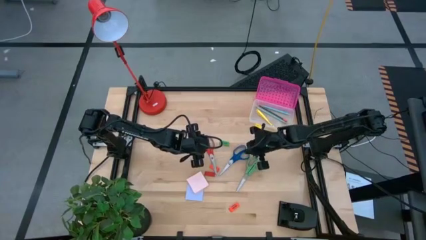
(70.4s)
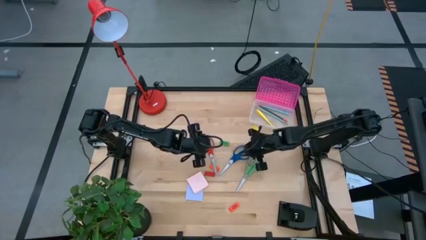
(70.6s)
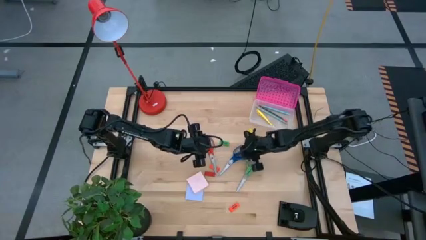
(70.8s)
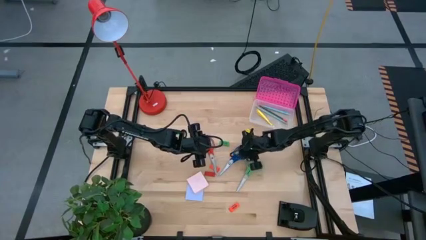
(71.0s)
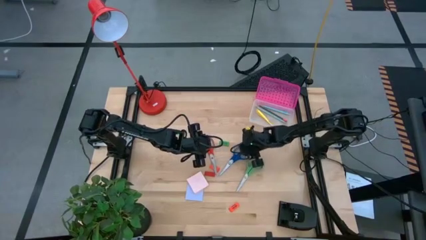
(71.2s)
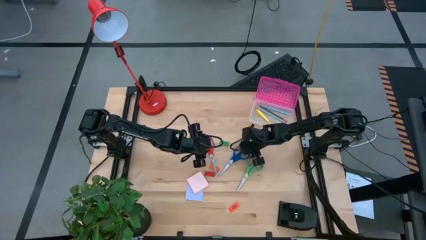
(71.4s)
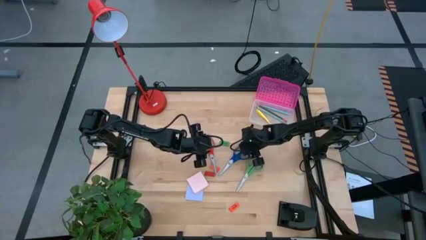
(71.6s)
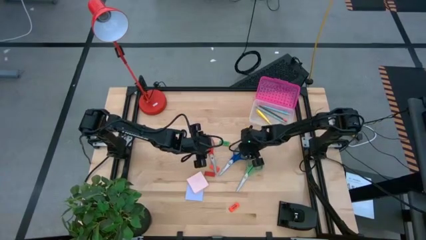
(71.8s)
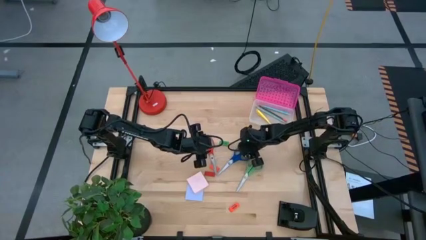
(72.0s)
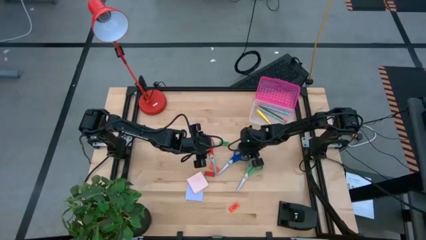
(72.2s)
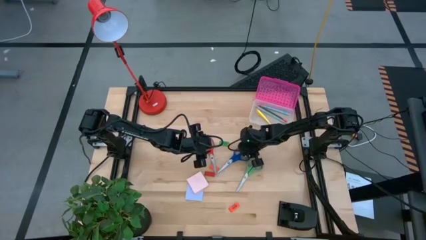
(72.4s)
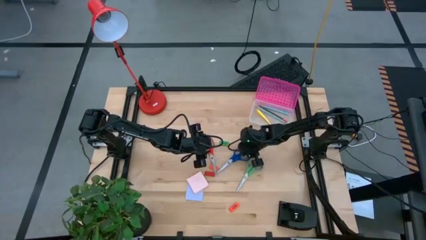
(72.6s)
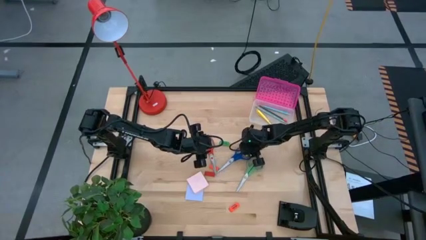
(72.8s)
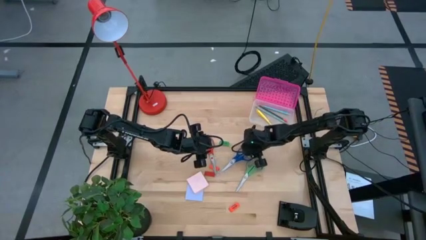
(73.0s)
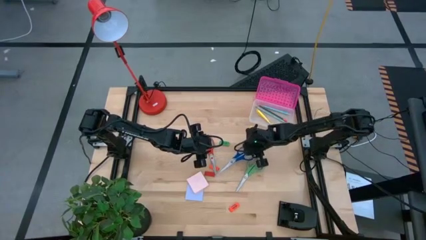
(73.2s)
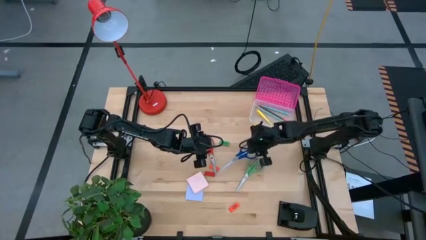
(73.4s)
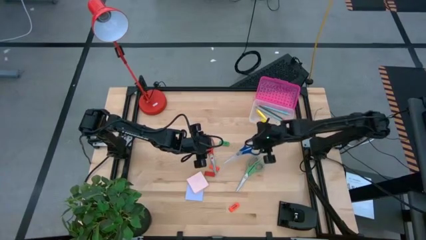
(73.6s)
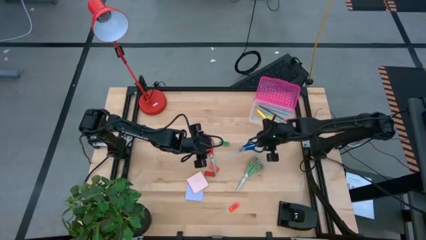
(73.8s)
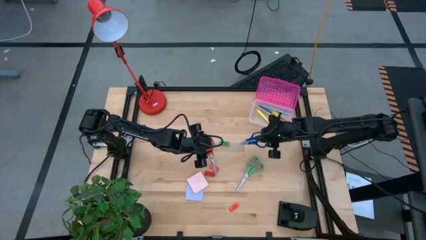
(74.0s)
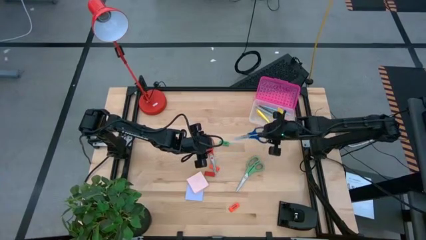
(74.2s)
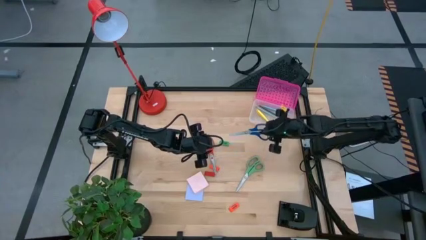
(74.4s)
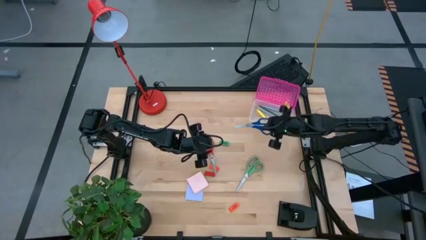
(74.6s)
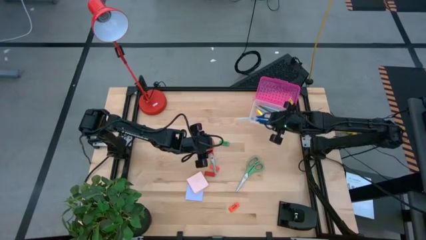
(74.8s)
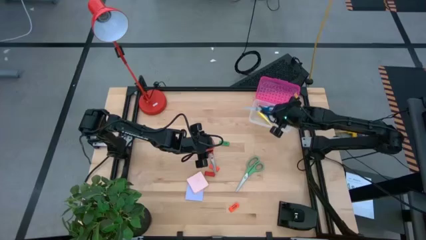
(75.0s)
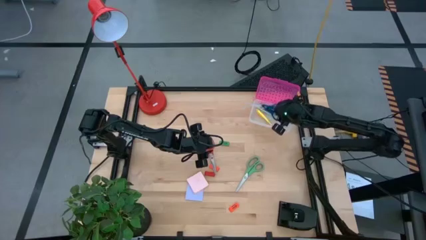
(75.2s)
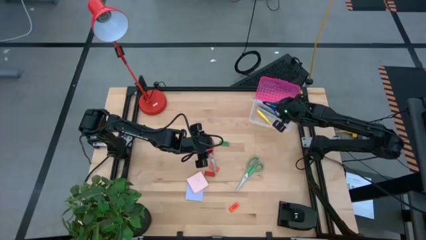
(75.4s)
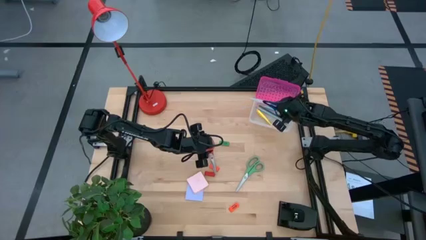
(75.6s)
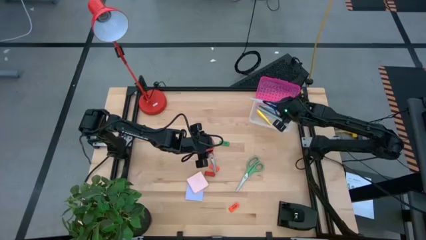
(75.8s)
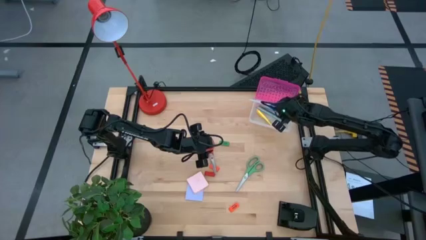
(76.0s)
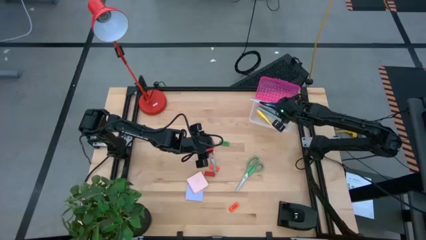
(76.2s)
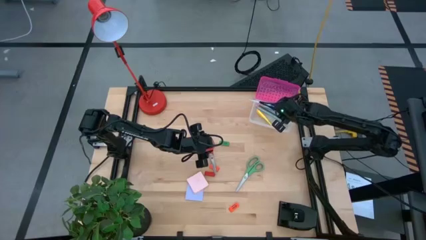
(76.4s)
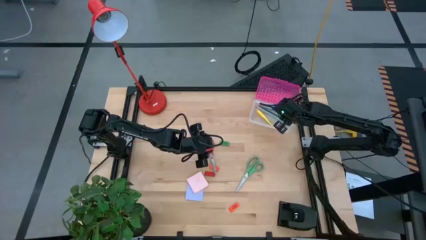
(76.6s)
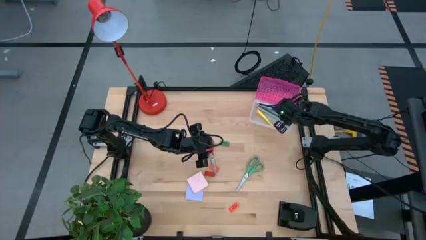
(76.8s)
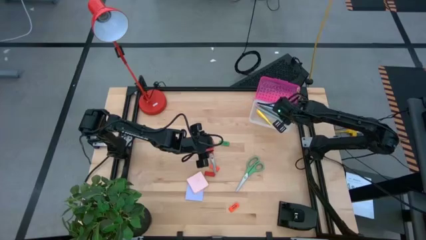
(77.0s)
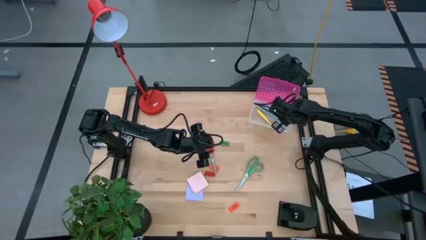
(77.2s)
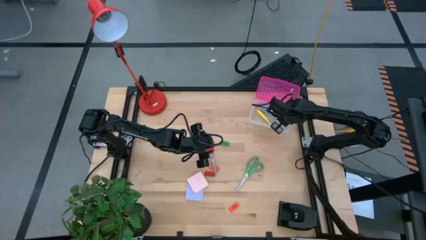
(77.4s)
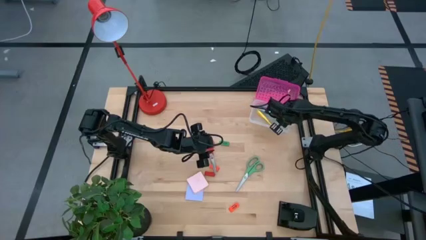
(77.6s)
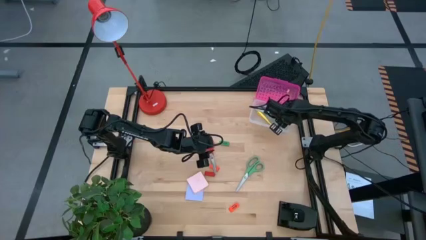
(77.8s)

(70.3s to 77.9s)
Task: Pack school essentials
Put the blue scissors into the supply box

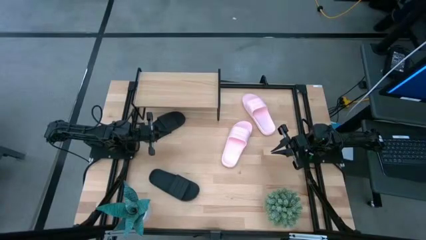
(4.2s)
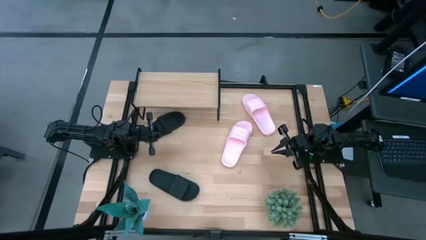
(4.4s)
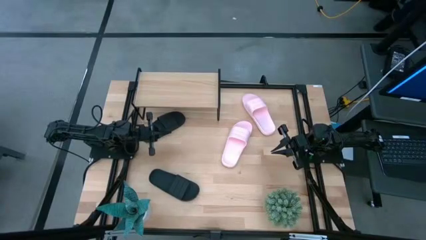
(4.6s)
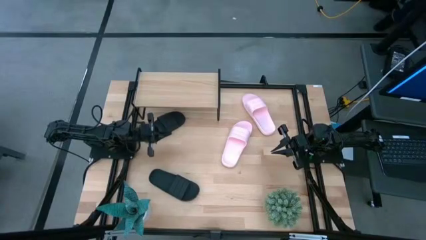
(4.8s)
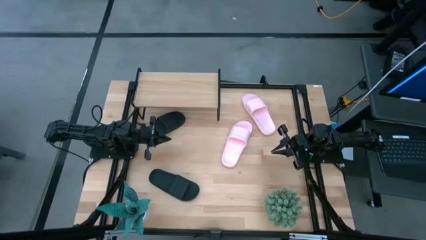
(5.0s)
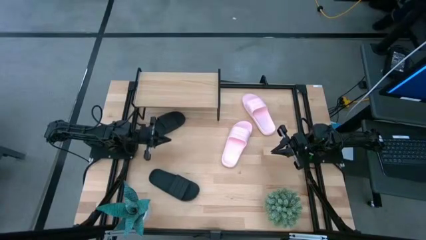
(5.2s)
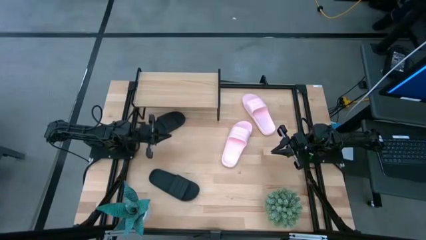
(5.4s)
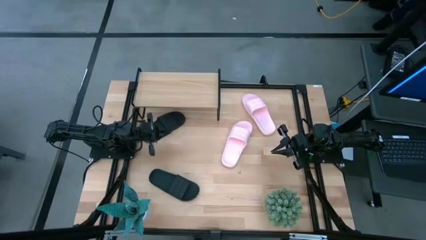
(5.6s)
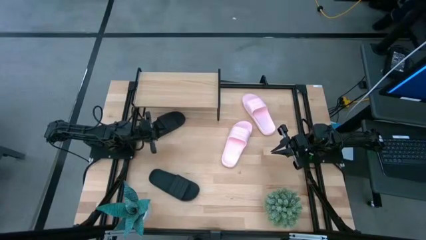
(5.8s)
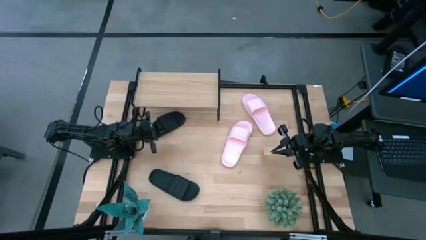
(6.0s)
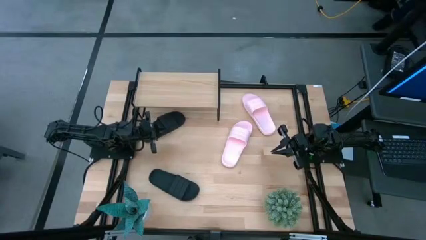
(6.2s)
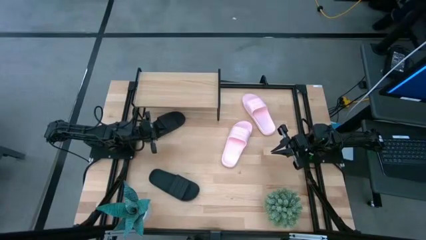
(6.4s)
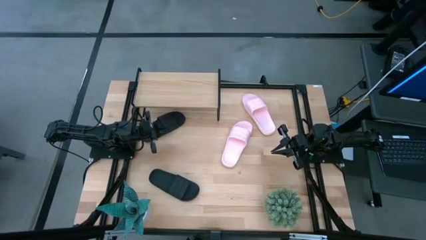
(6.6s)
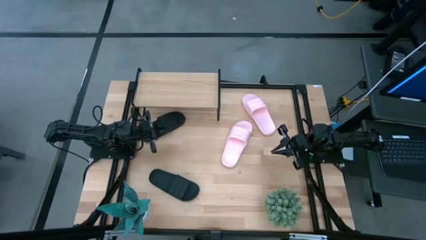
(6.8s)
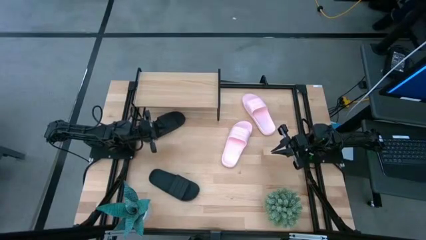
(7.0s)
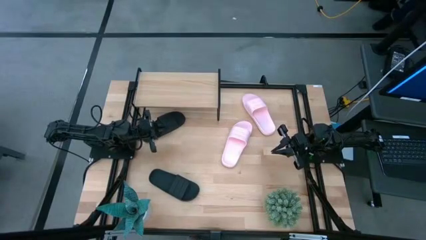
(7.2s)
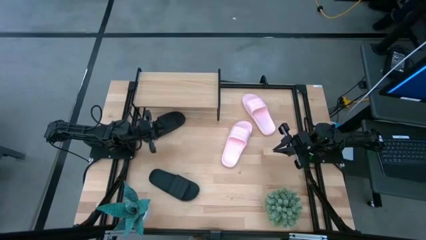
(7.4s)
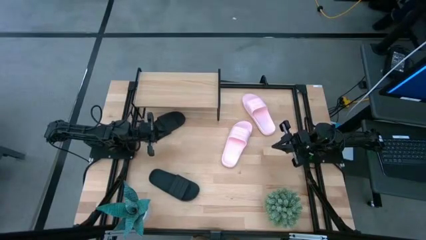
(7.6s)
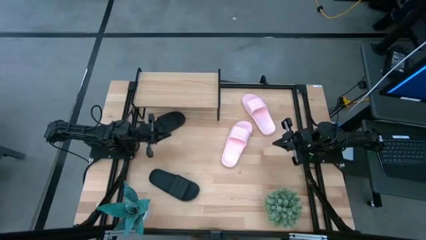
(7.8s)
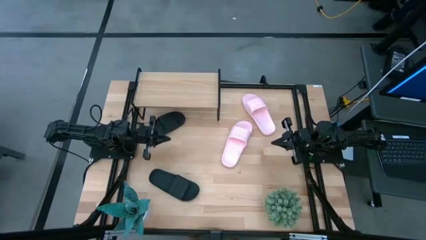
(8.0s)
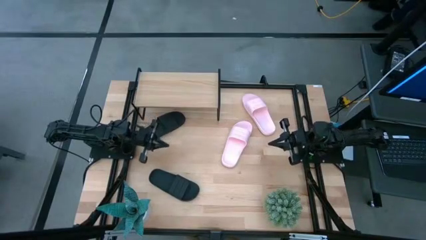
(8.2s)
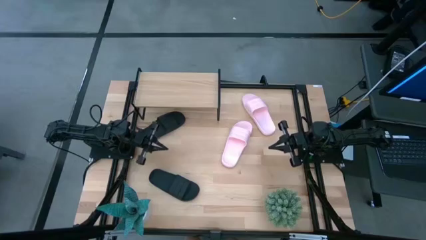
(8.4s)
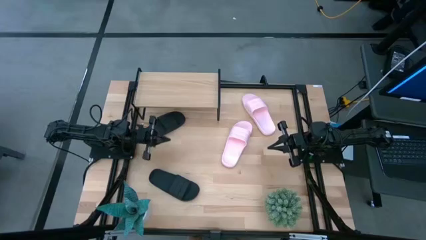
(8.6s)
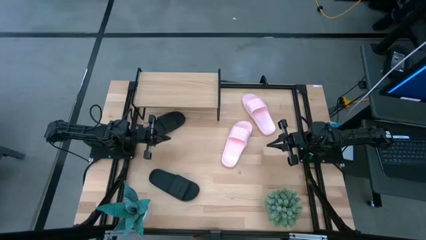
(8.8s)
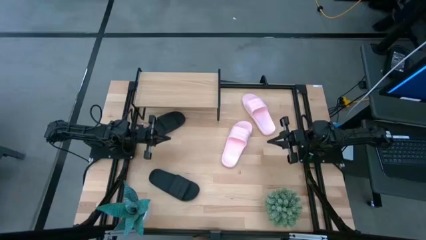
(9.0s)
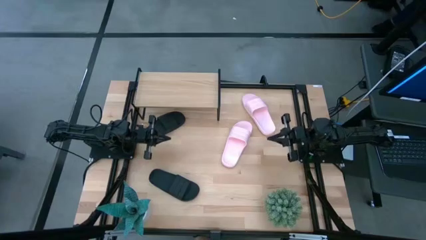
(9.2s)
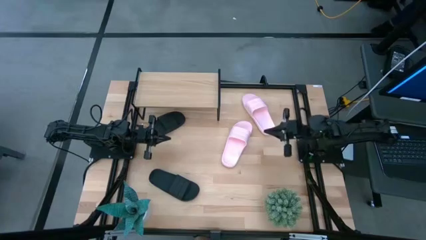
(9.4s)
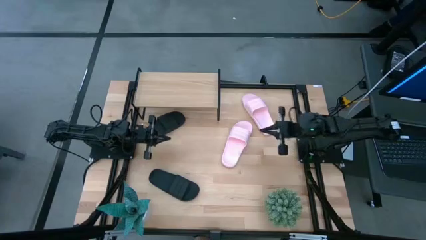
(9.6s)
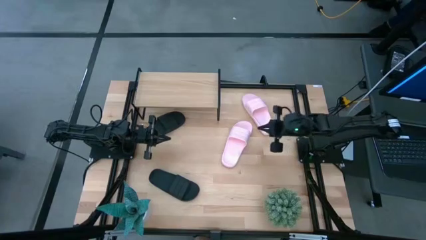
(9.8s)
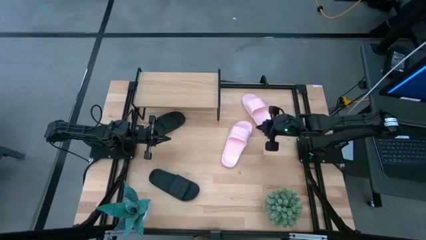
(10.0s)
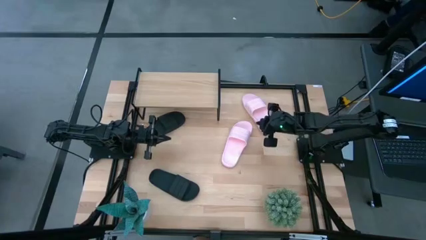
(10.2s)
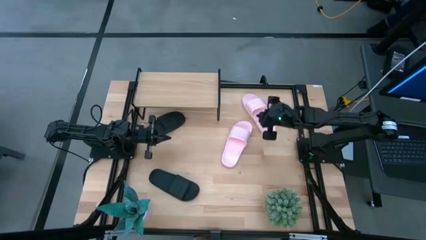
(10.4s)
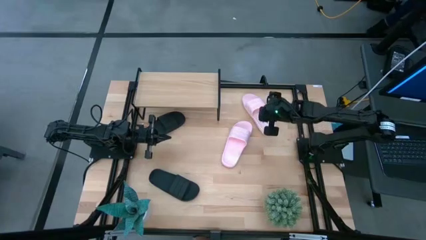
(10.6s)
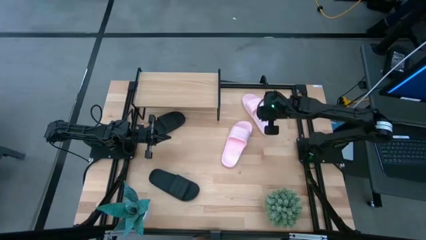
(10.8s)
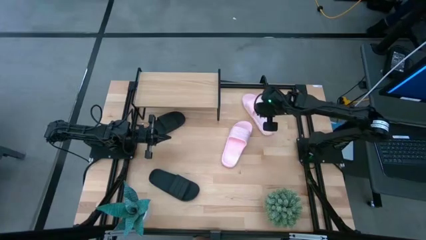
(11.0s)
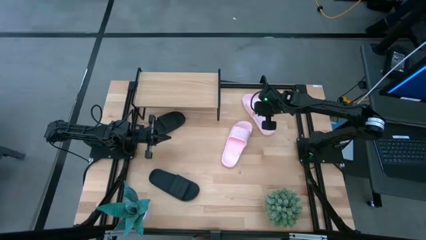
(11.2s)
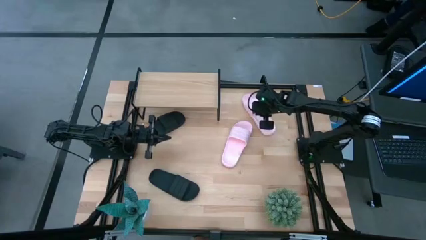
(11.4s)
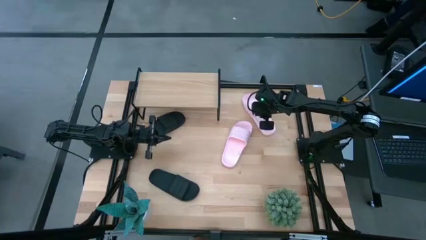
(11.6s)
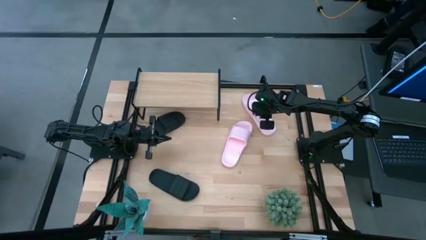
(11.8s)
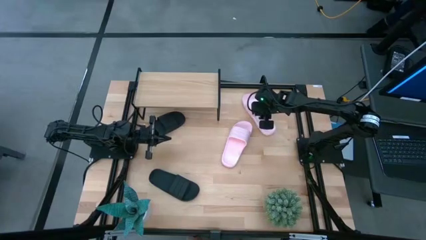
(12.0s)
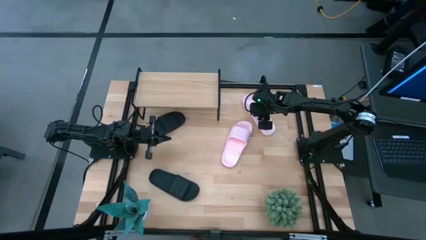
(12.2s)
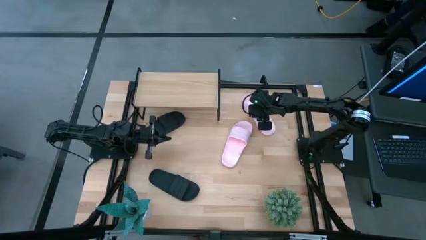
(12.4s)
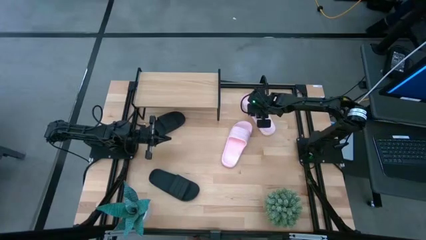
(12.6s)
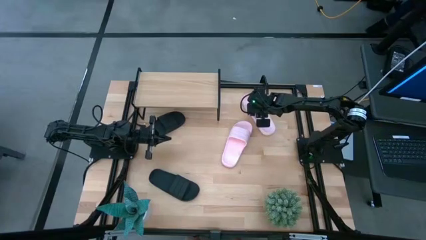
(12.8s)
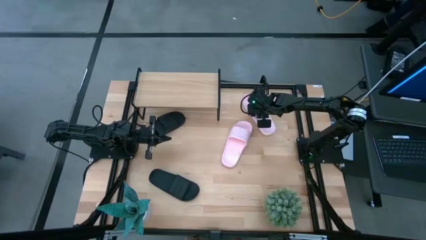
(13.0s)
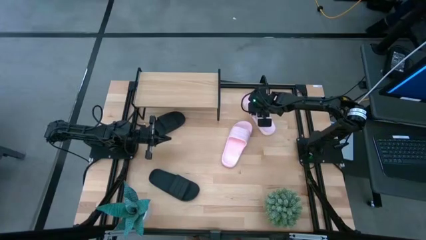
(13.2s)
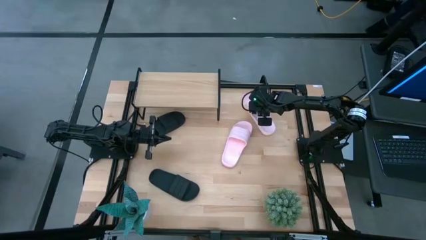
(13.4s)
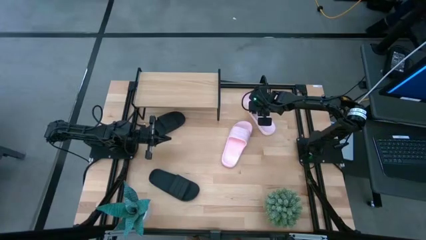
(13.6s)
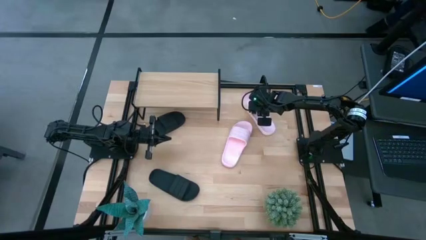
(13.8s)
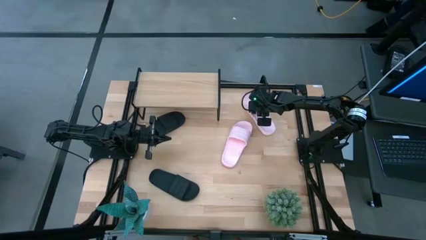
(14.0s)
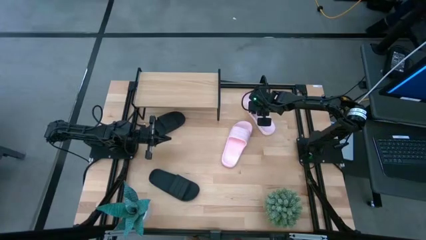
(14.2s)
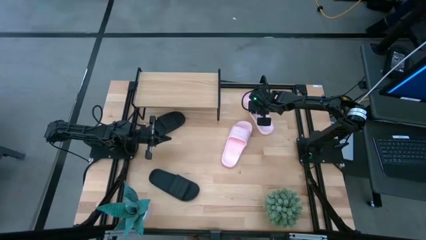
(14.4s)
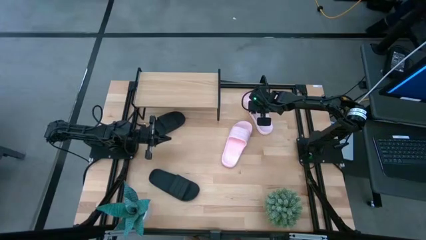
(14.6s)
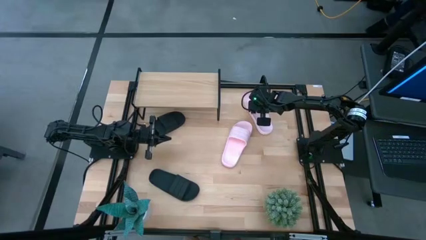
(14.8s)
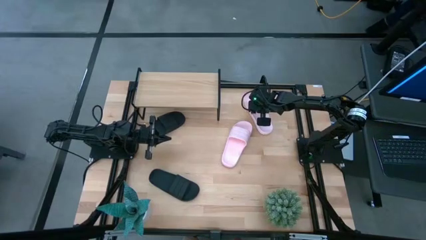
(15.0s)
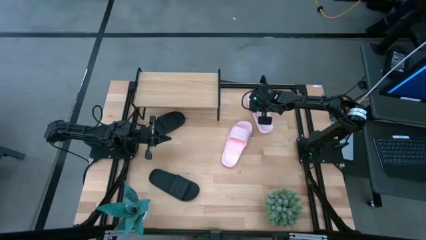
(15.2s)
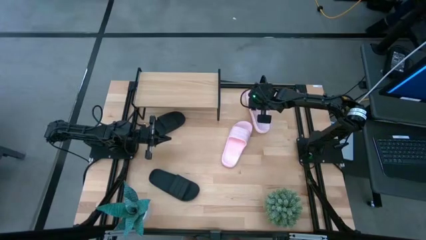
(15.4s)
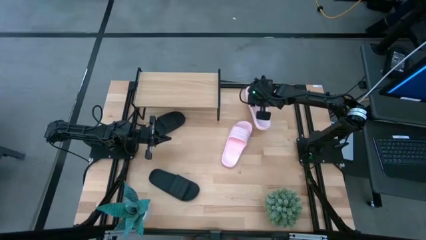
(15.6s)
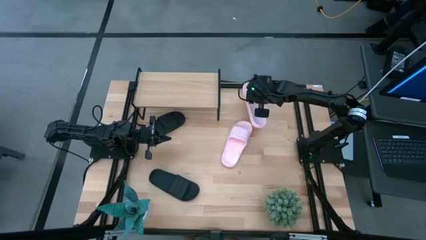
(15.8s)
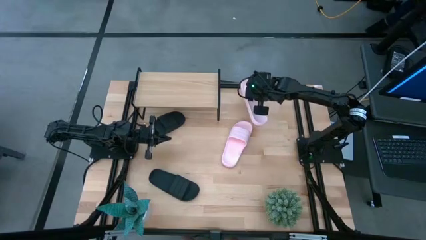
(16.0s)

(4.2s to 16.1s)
Task: Pick and place slides into the shelf
Put the top pink slide on the shelf
